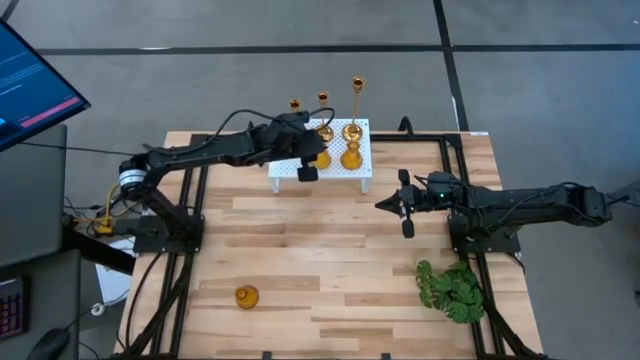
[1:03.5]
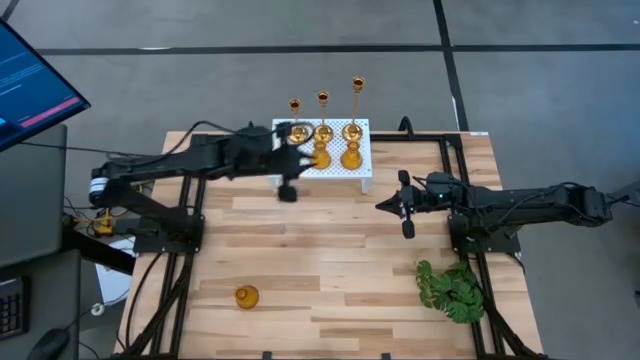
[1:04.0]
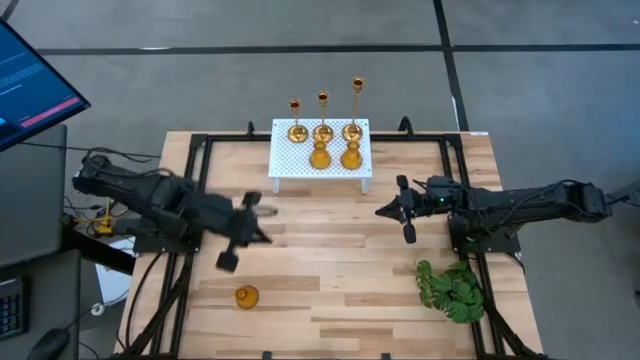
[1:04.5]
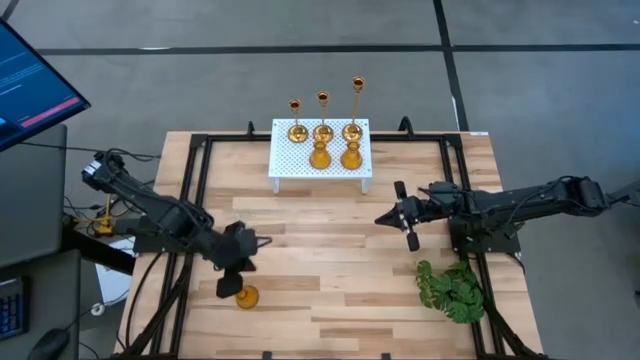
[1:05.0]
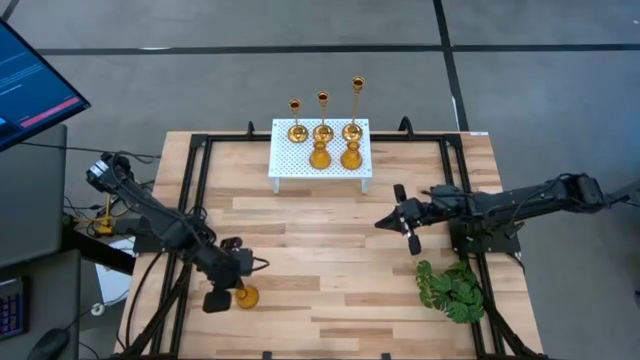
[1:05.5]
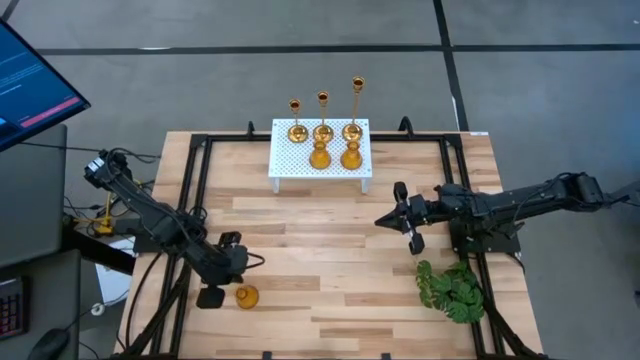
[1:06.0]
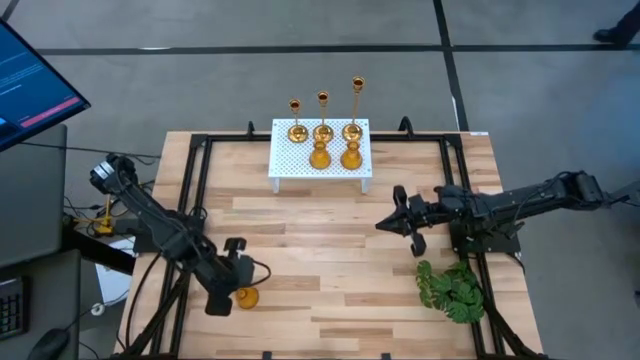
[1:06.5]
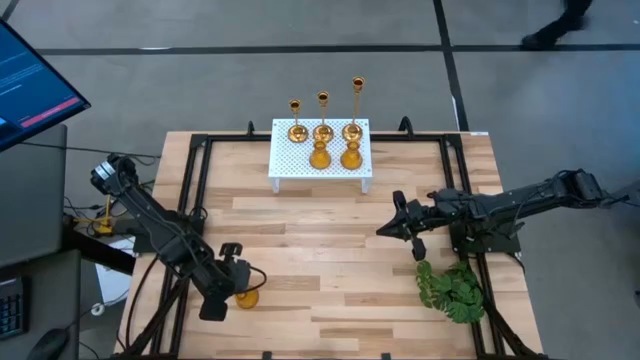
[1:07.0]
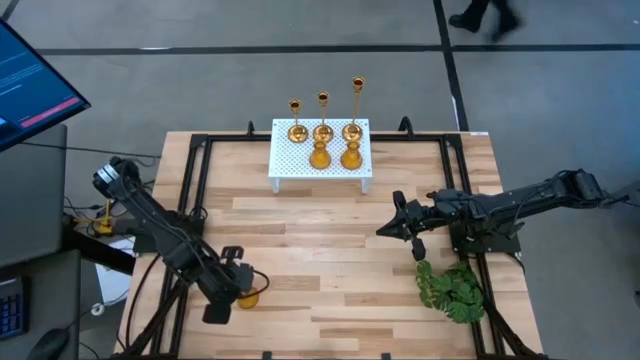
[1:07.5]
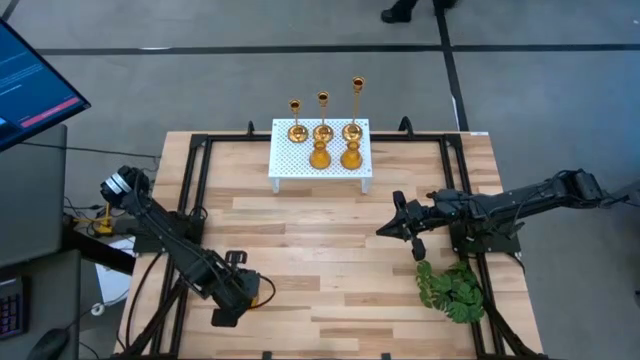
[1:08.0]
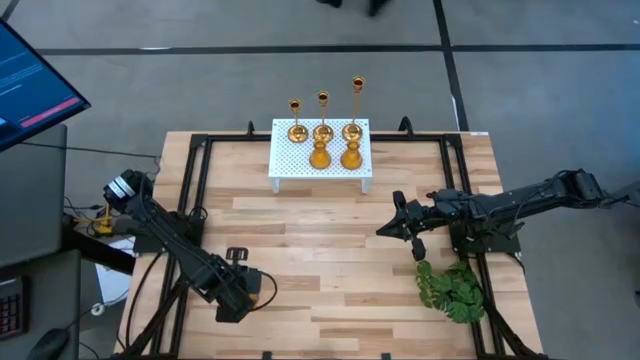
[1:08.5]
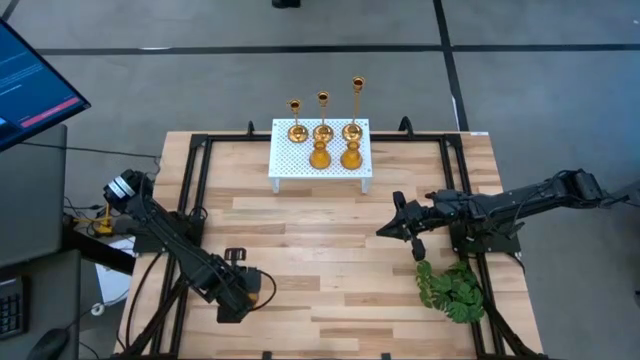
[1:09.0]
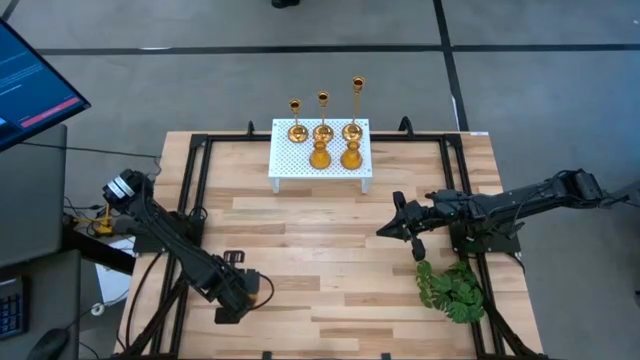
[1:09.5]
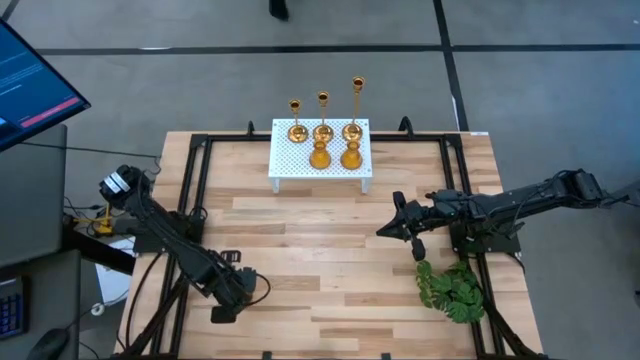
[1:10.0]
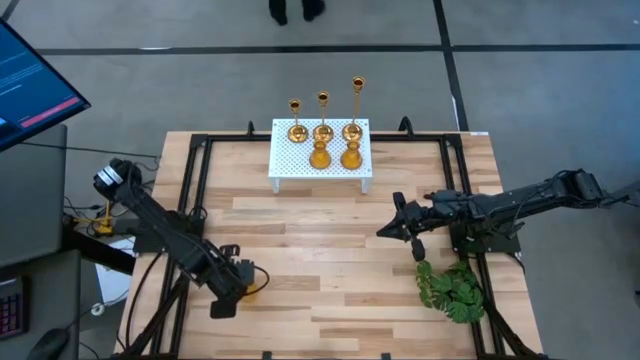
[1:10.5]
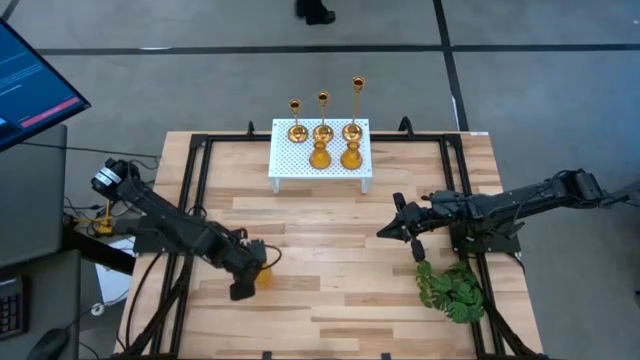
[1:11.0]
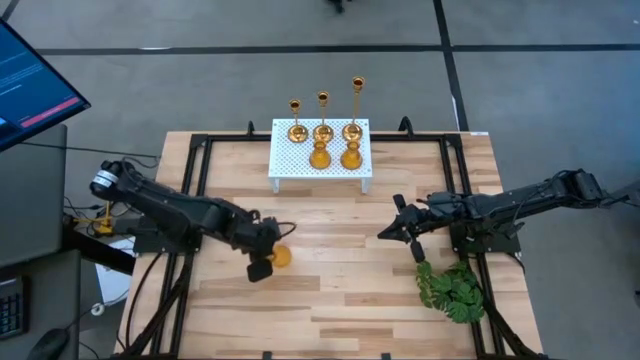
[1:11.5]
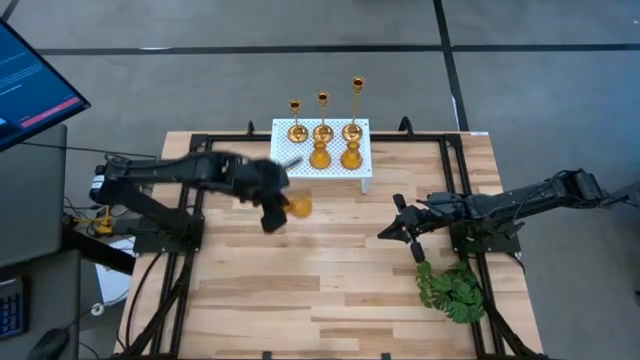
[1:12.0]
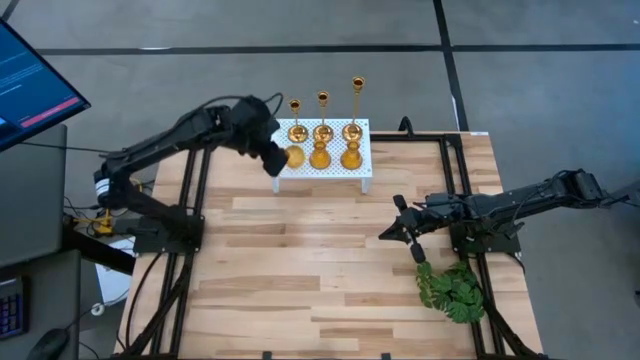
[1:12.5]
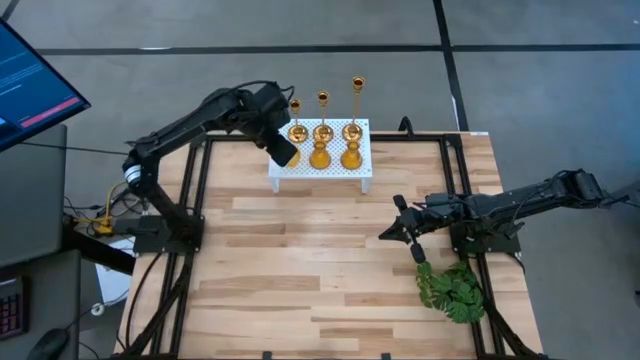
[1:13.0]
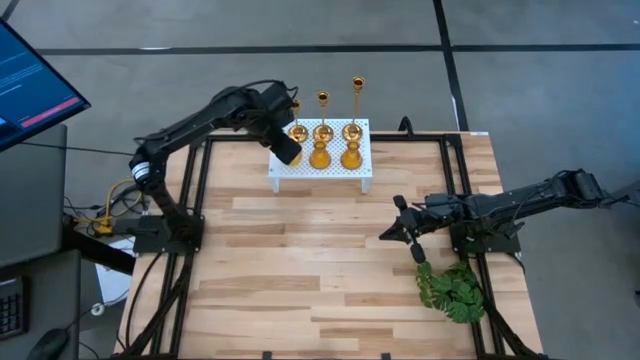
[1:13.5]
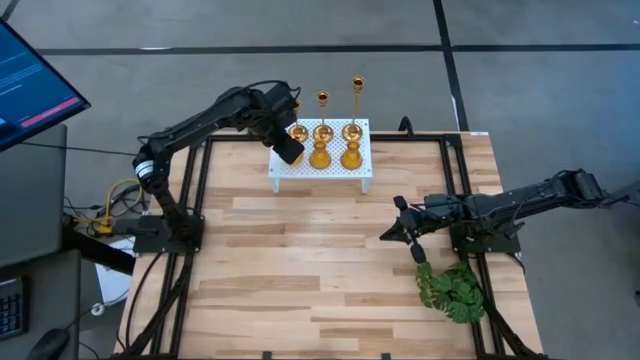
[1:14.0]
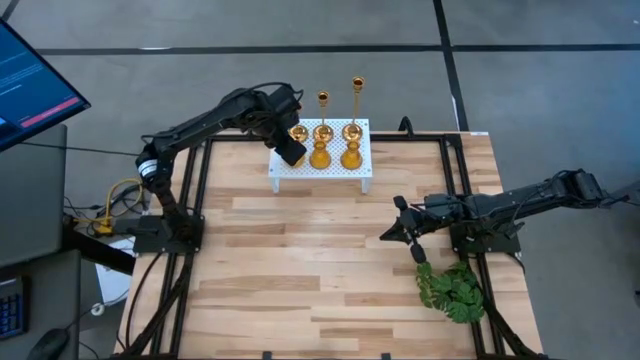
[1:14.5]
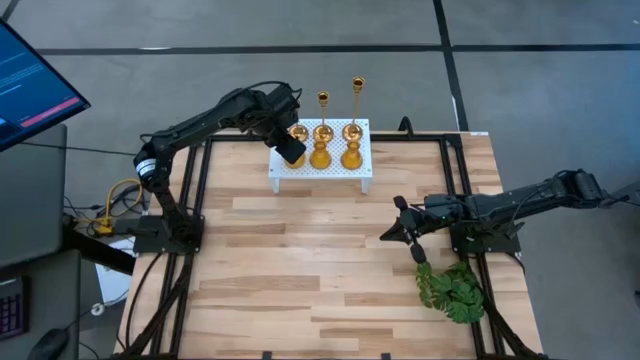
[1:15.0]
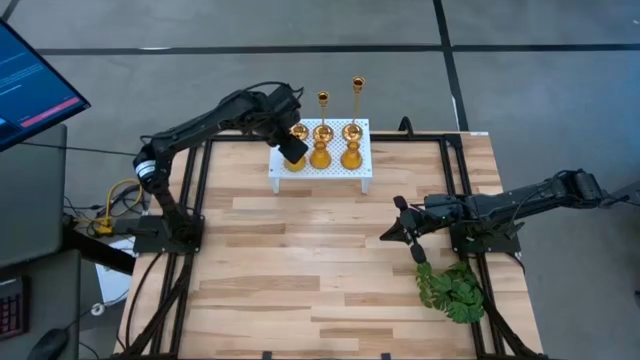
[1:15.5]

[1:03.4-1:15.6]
Task: Pick & Place candle stick holders
Put the orange candle holder on the shelf

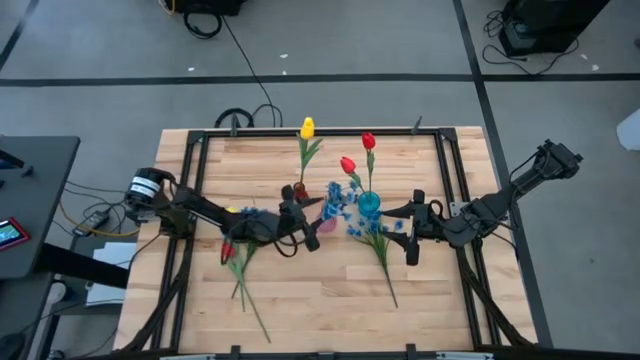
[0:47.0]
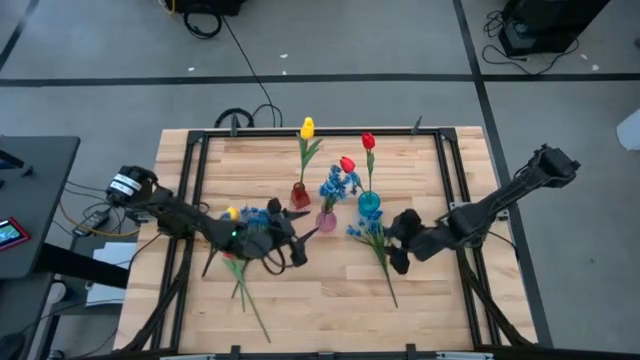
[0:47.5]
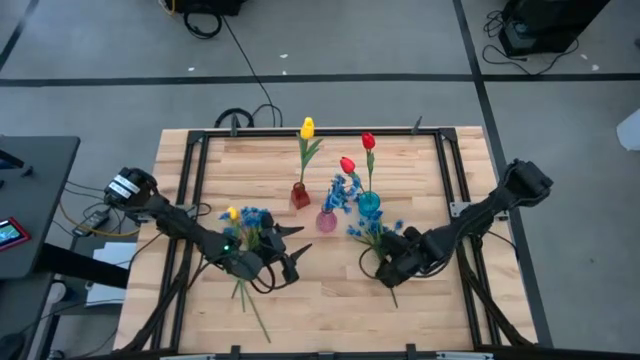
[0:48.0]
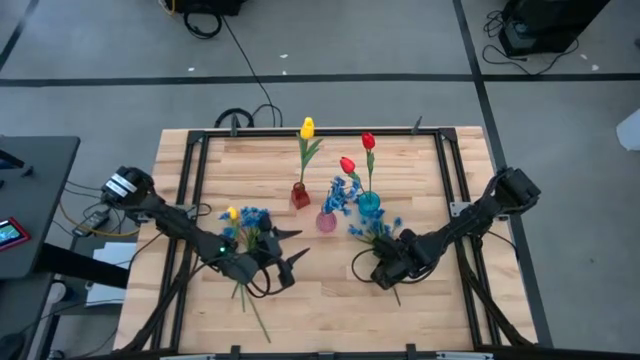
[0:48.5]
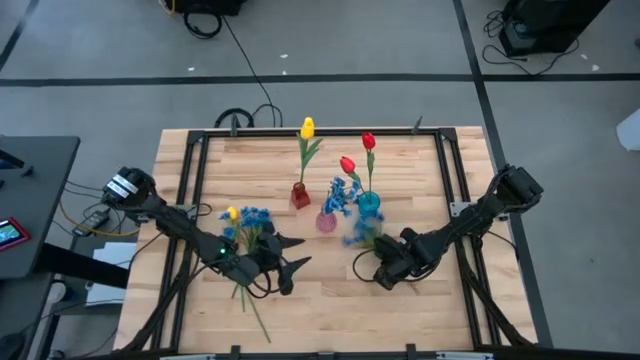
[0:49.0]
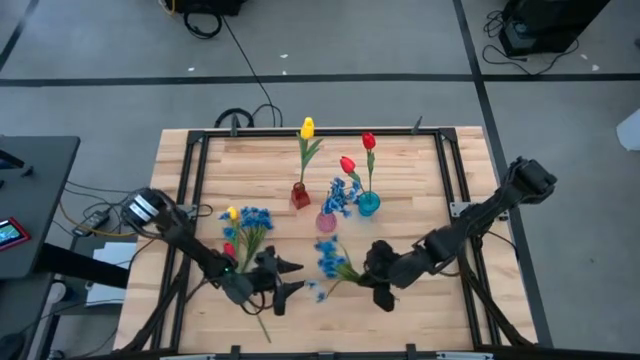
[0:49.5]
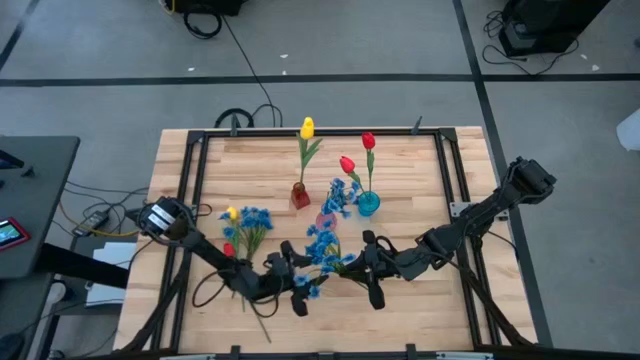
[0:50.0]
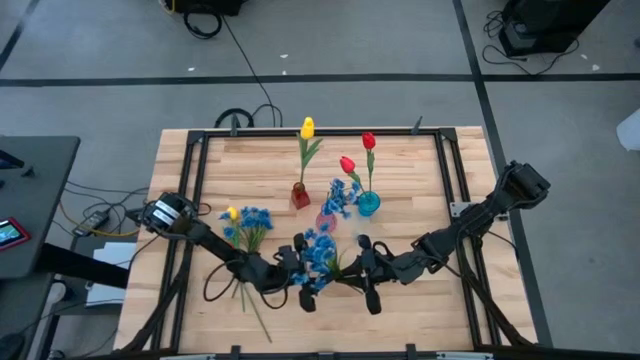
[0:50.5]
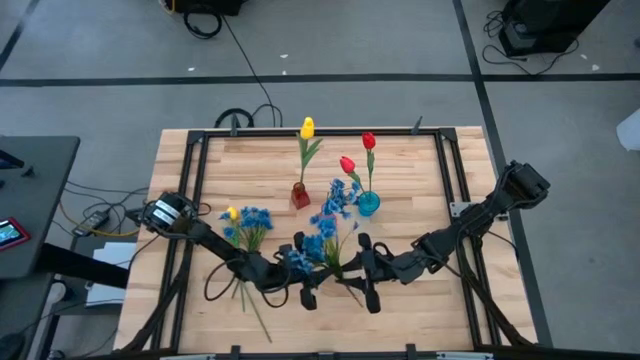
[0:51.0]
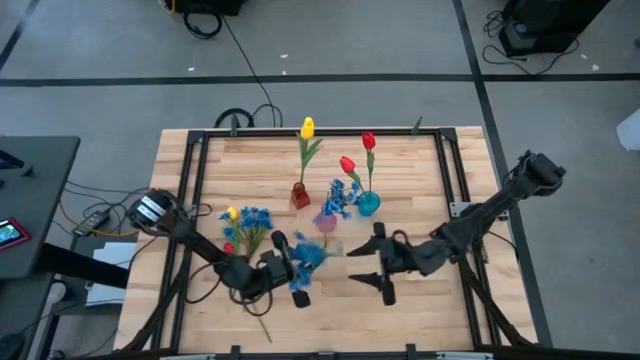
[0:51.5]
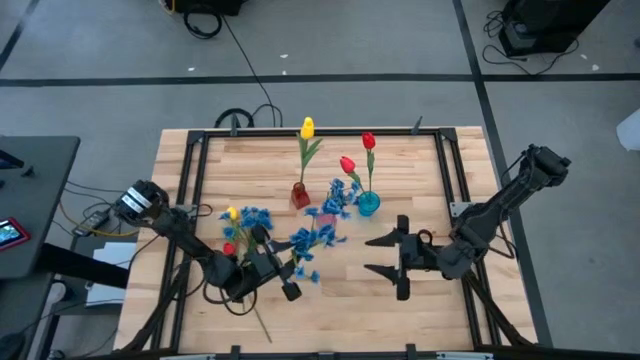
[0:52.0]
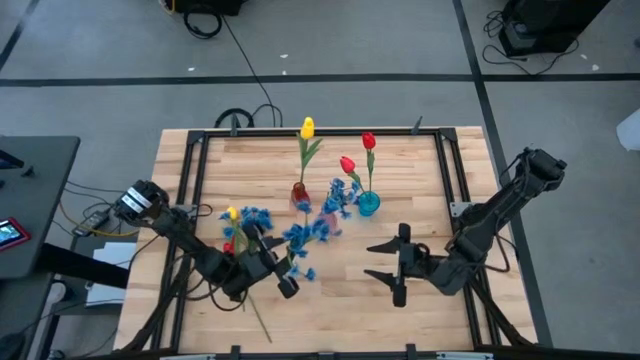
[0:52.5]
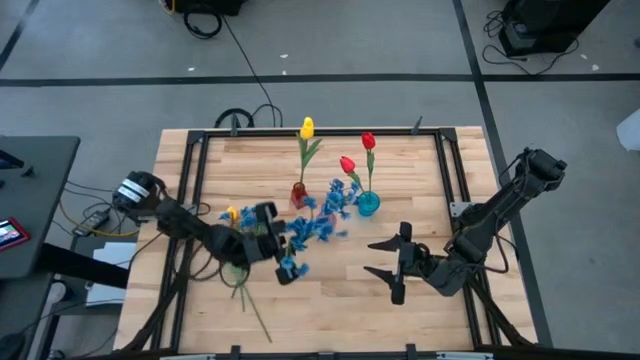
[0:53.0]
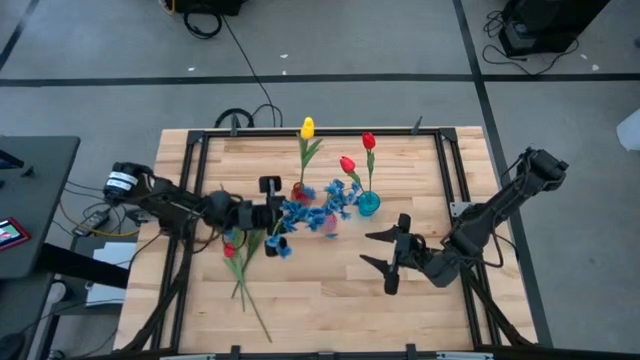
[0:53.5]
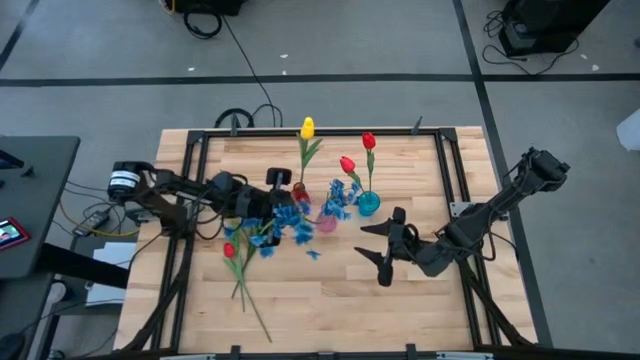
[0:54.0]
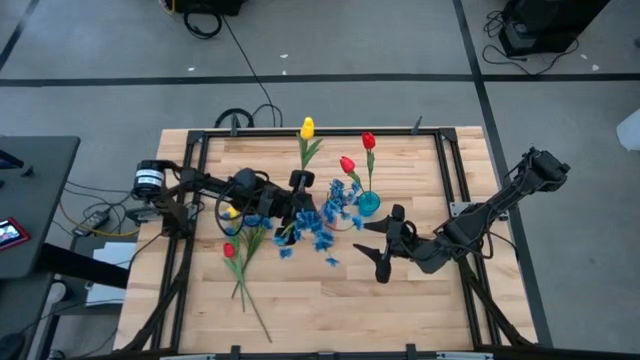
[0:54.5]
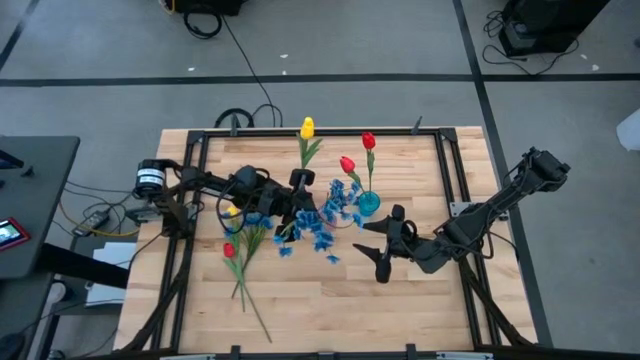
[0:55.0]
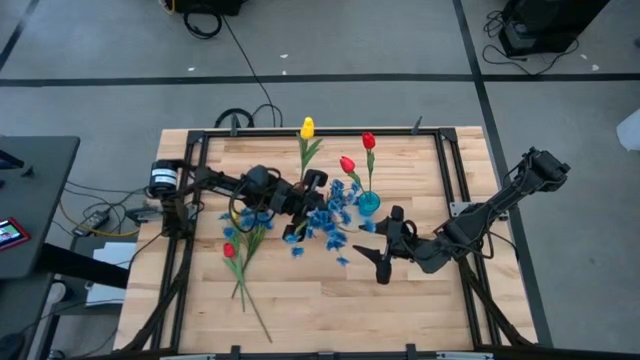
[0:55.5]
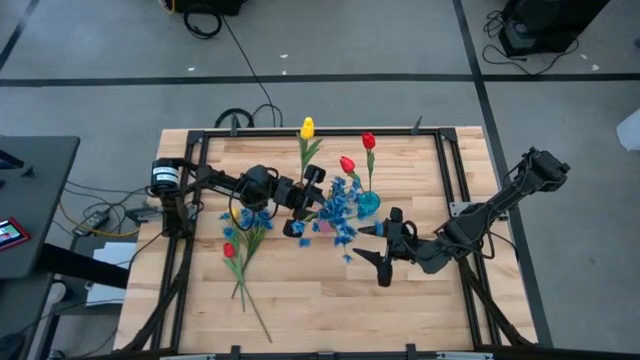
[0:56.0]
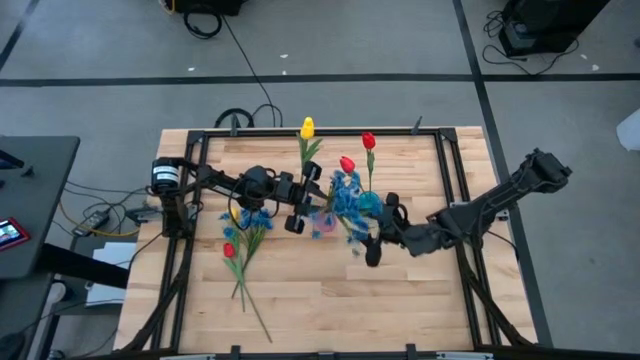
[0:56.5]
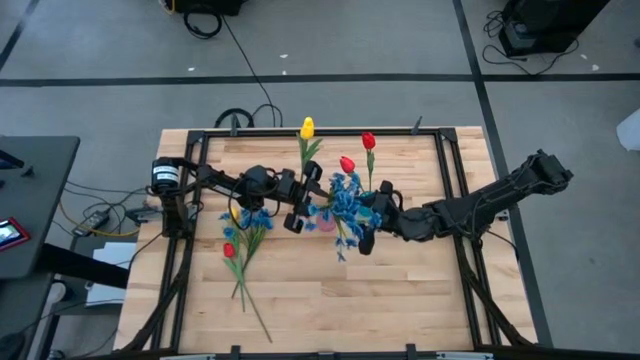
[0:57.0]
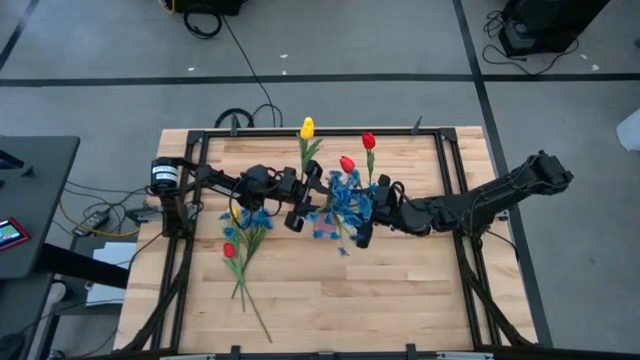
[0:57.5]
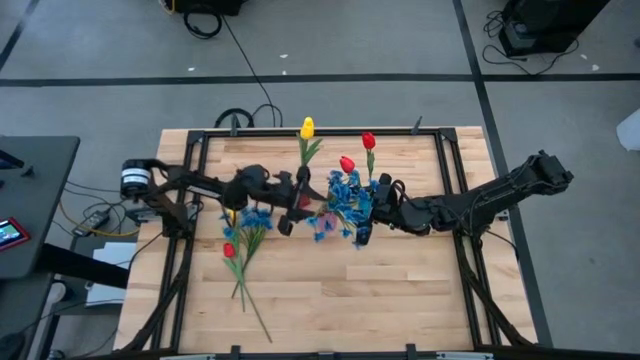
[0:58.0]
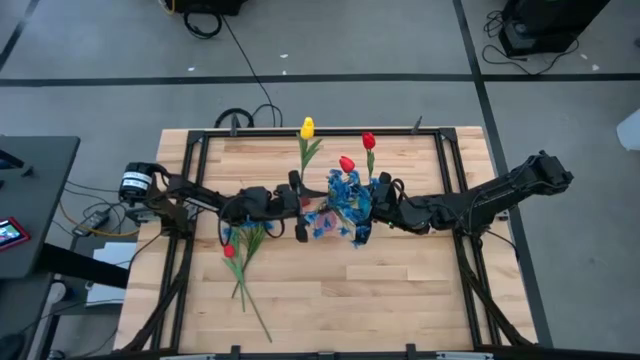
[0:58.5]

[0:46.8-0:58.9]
Task: Sort flowers into vase by color
Put the blue flowers into the pink transparent vase
